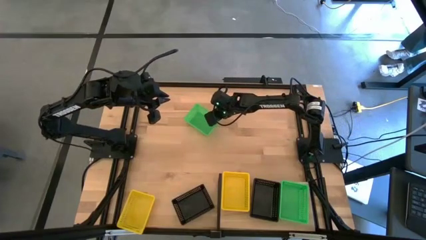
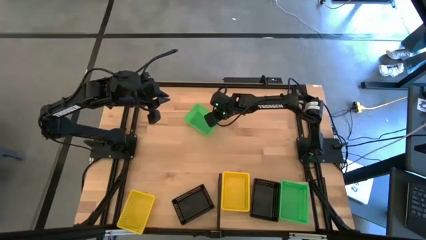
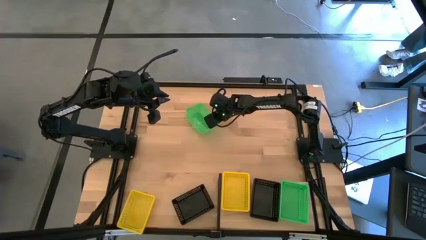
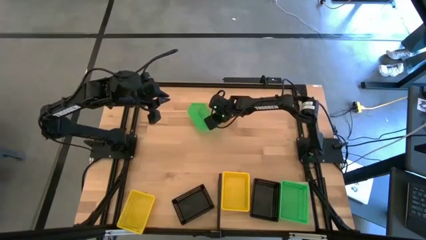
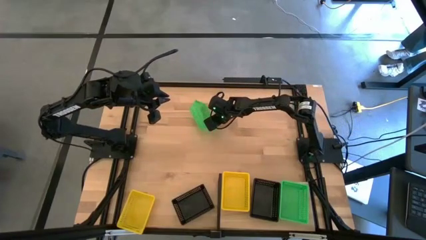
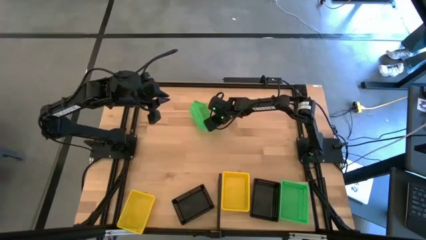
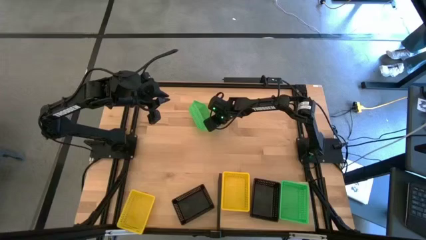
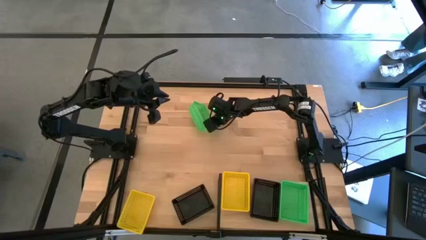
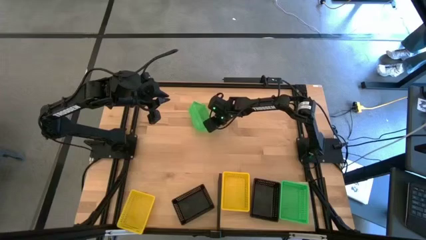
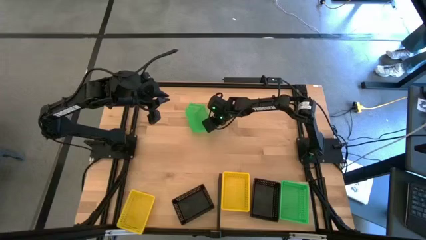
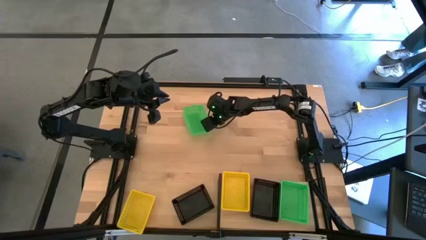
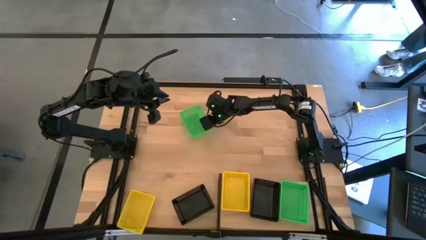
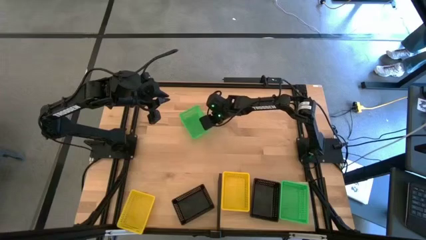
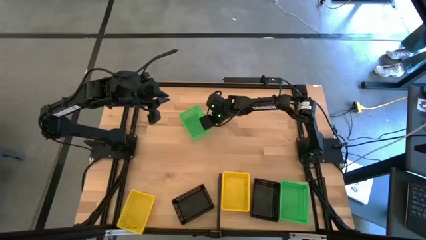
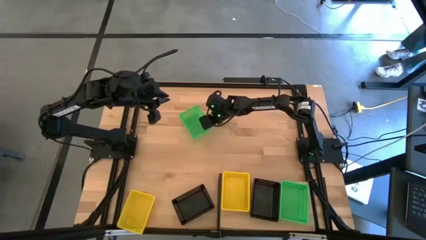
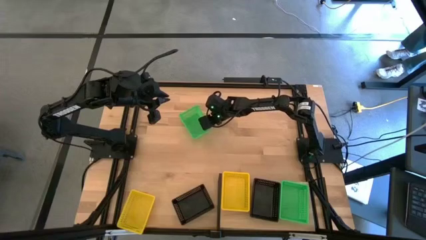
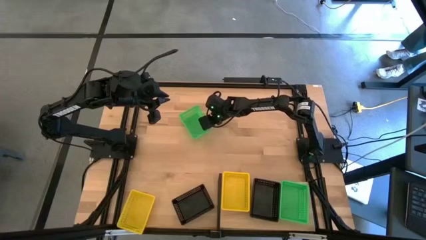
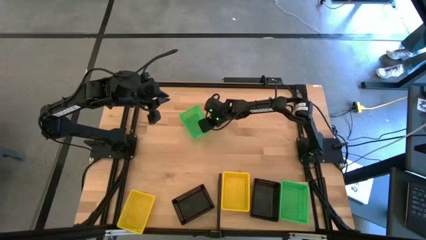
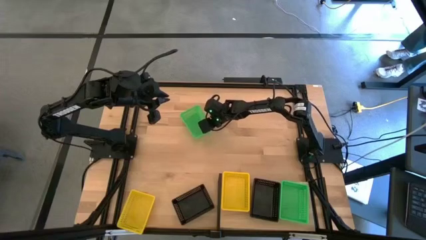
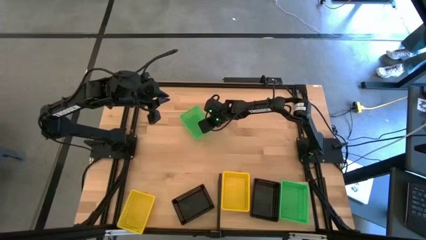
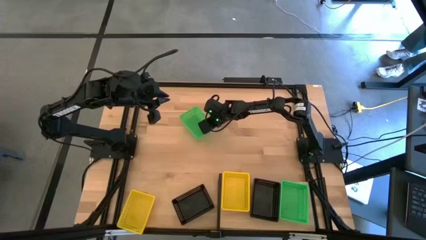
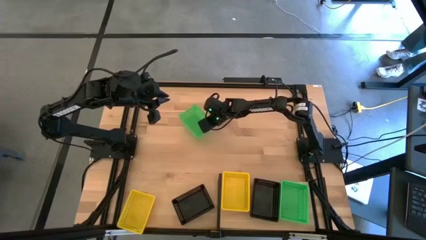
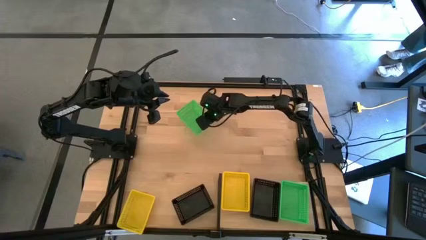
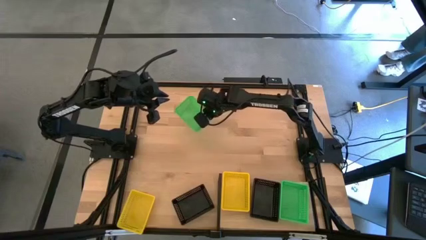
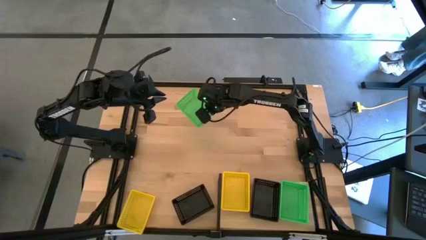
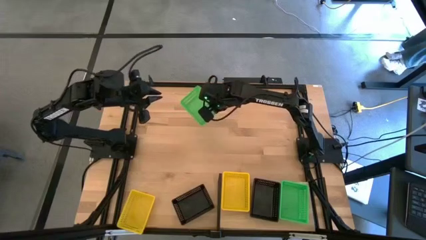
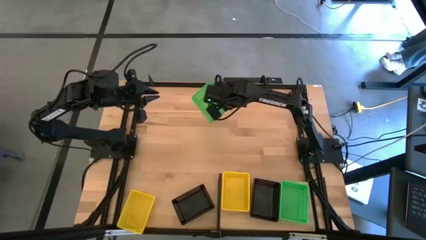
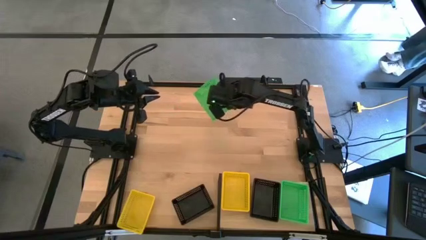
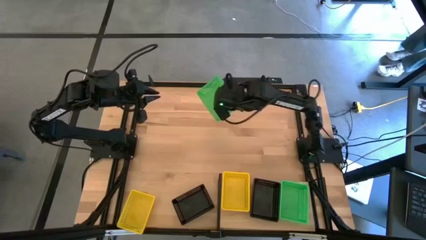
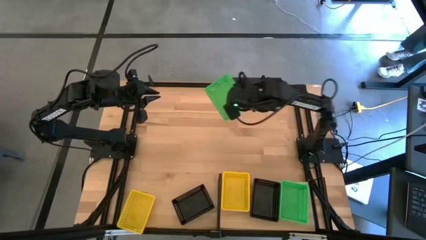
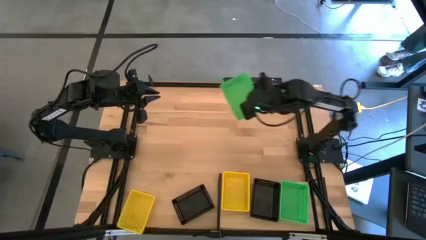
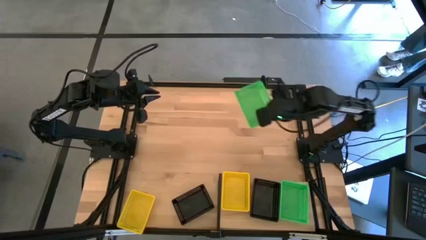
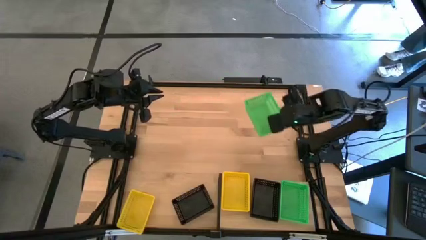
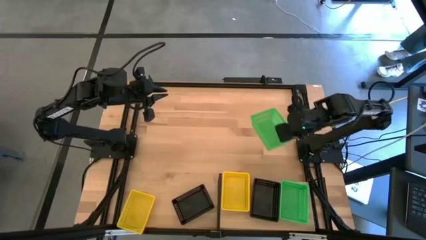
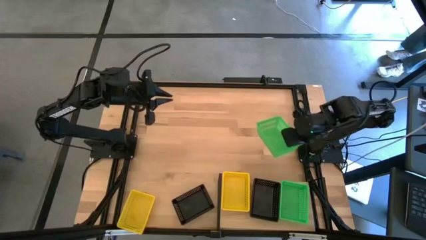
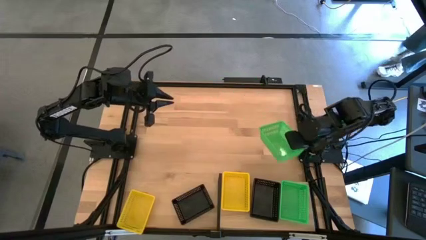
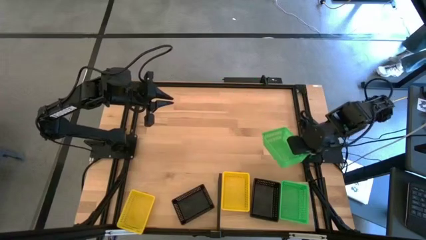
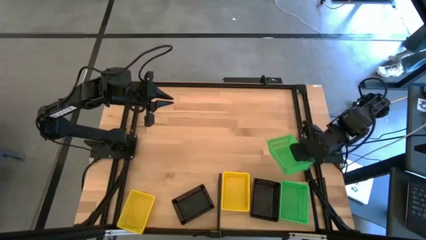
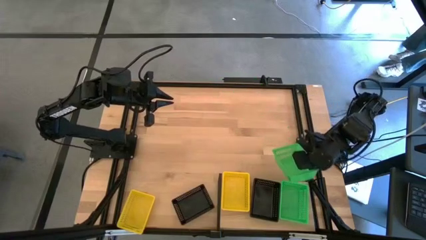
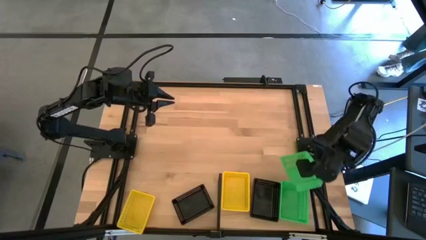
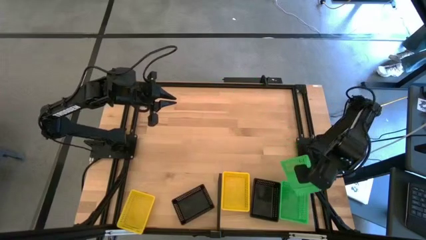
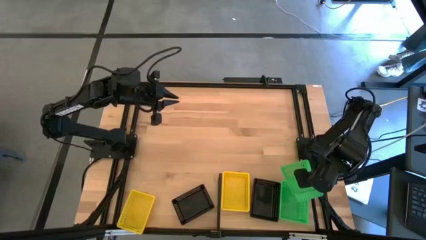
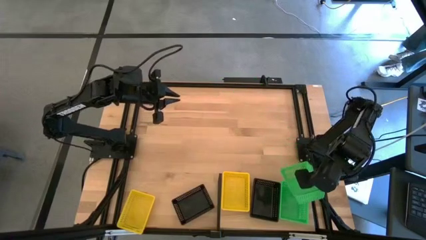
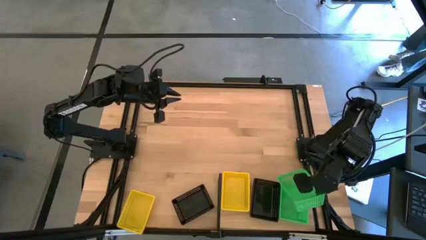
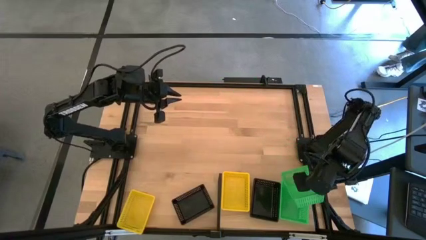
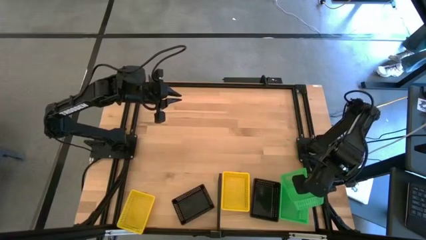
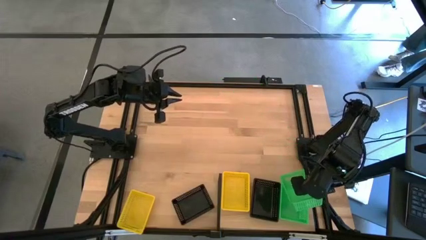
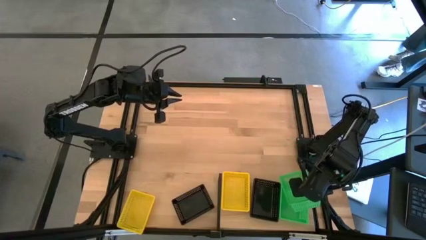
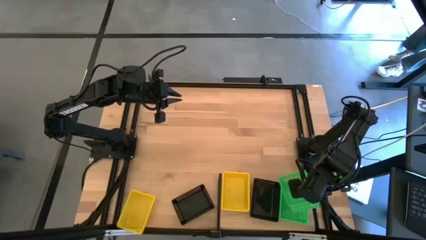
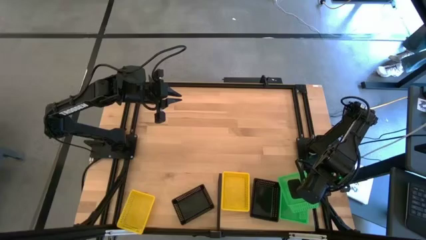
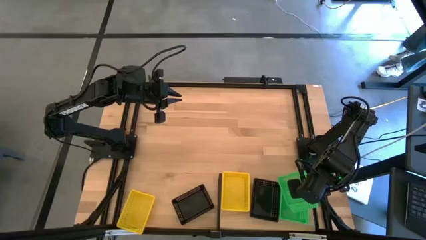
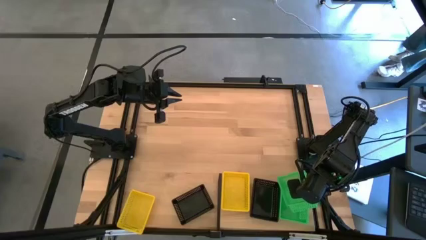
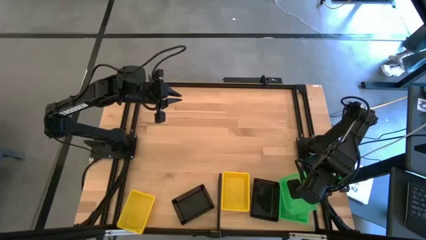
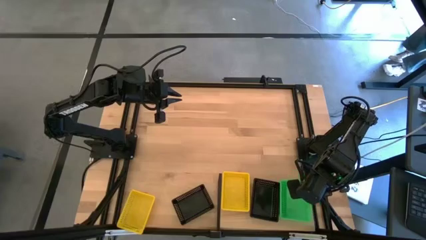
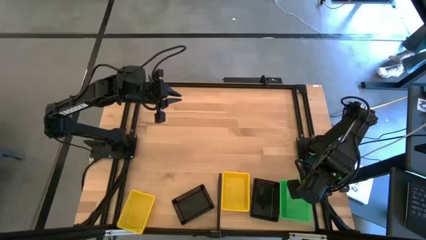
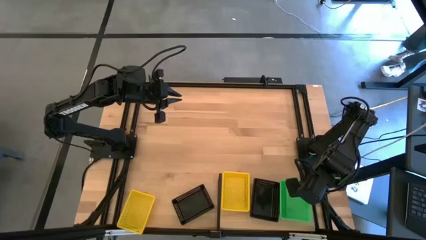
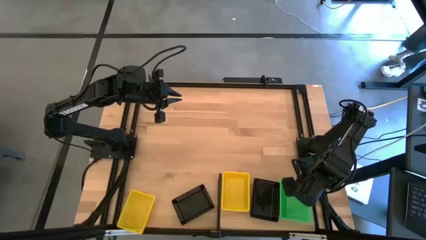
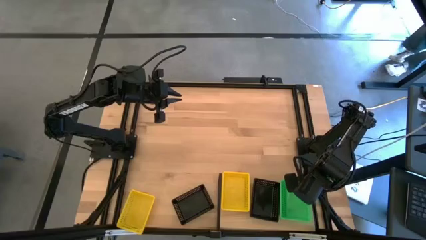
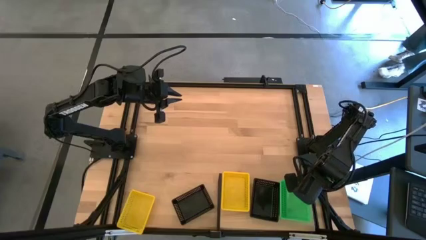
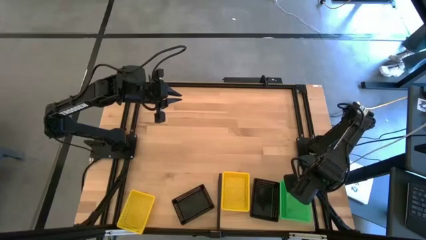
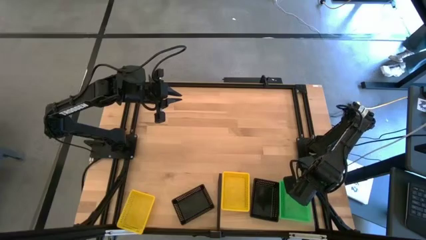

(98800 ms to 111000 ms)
Task: Stack baskets on shelf by color
Stack the green bin on top of the green bins on the shelf

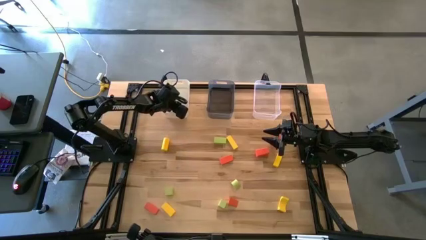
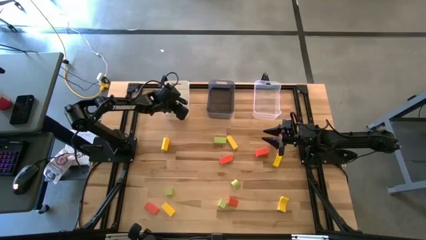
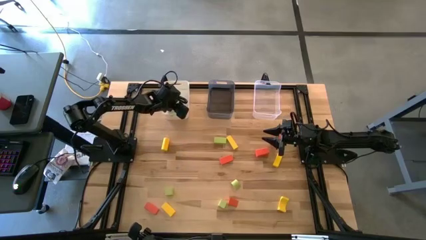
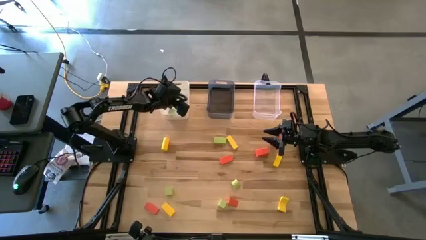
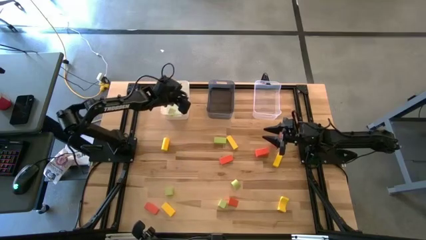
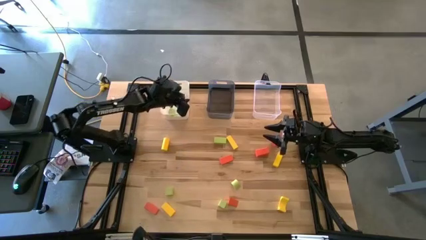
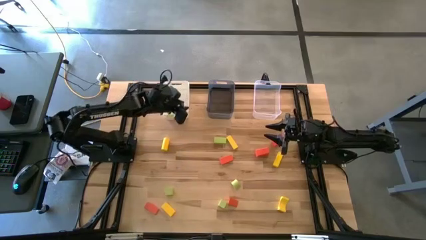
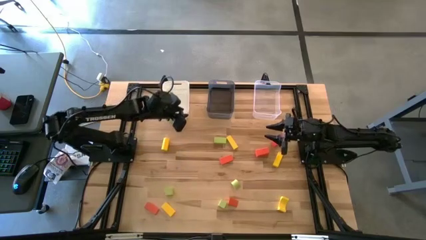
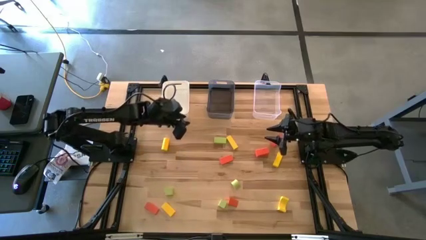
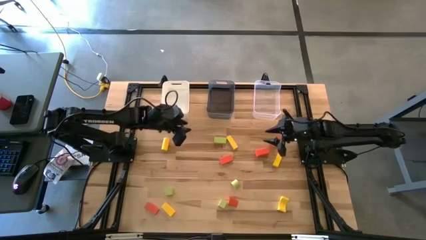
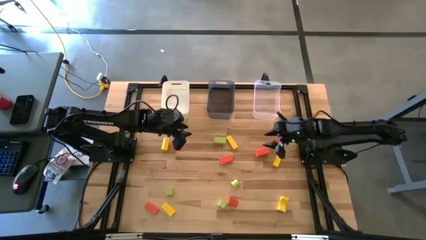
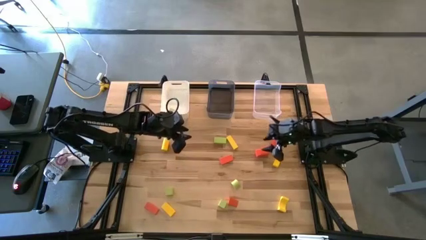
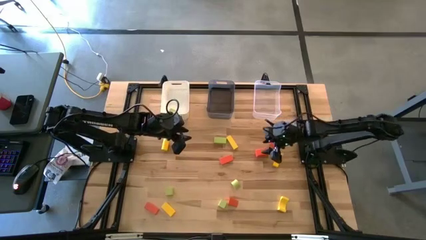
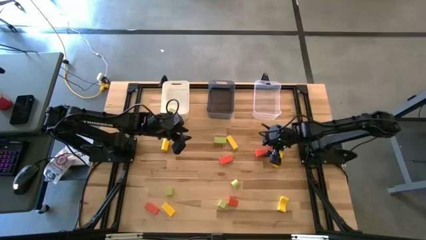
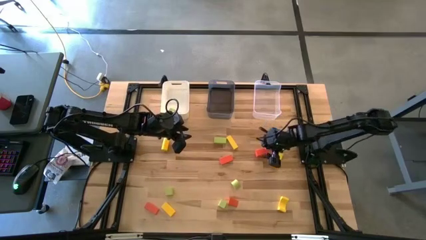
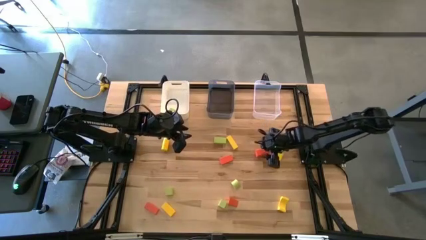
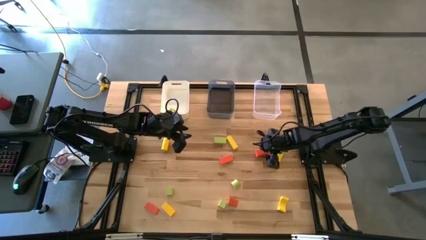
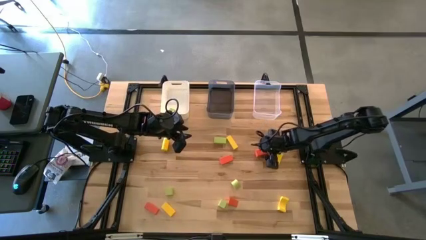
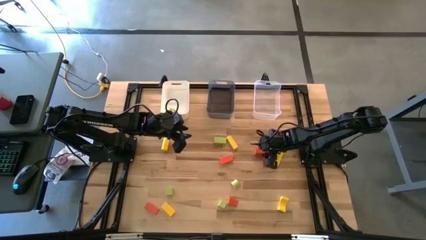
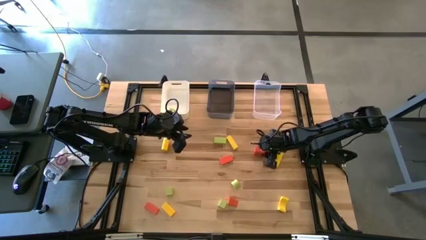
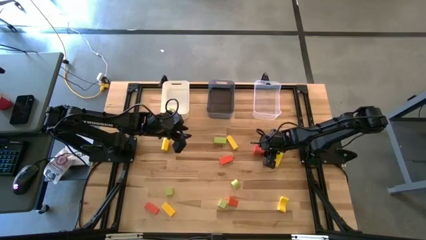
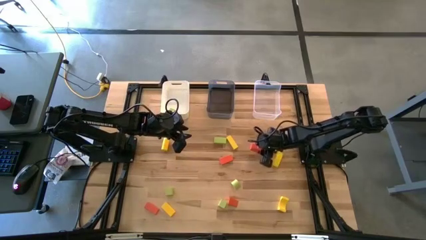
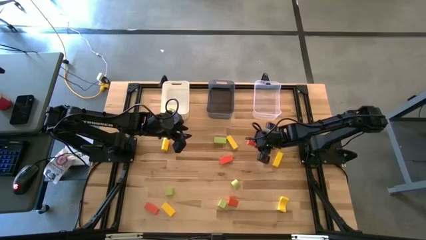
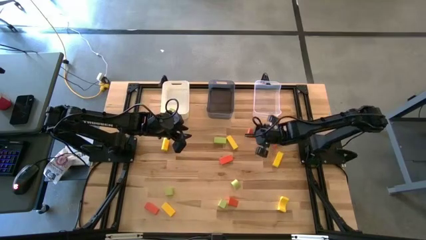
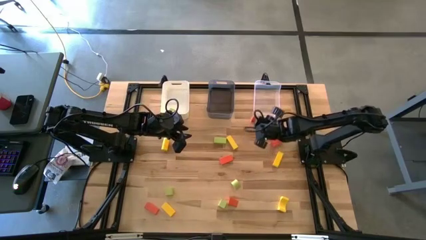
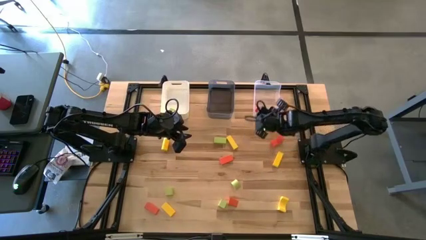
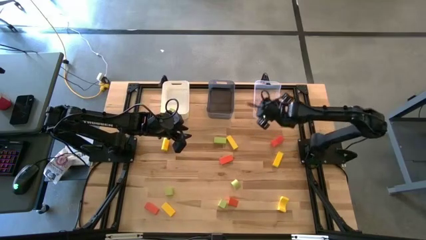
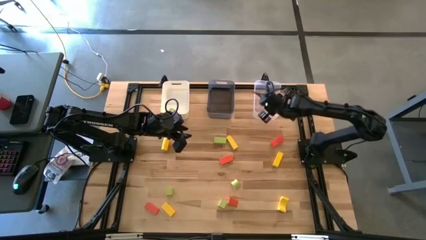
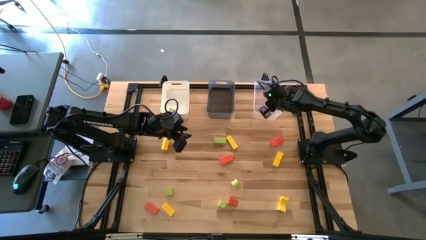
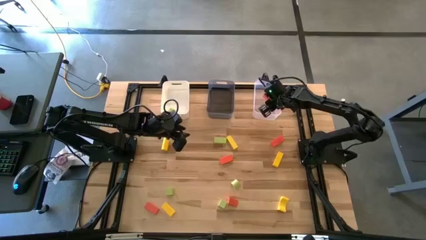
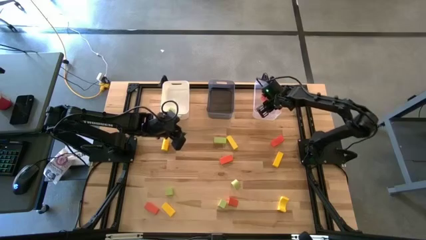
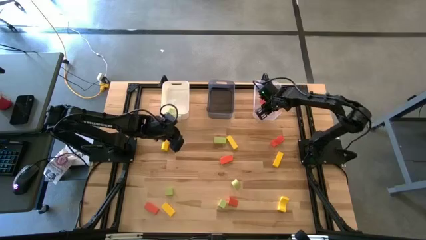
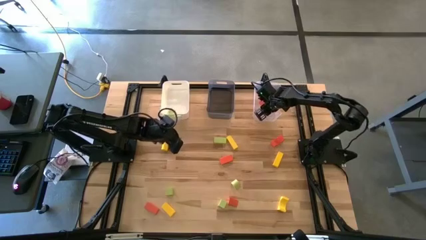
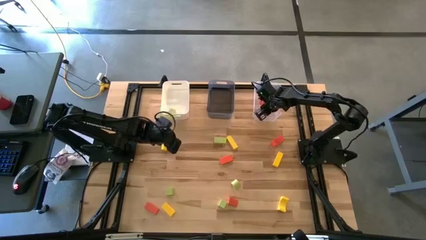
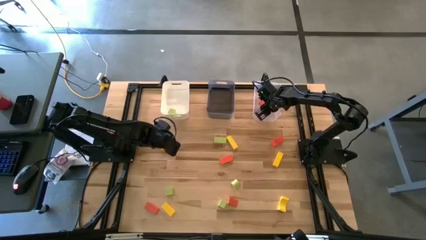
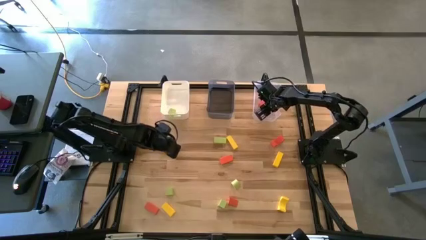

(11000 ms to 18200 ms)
Task: Sort & place blocks by color
Put the orange block into the transparent bin
